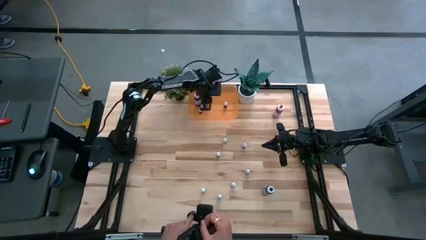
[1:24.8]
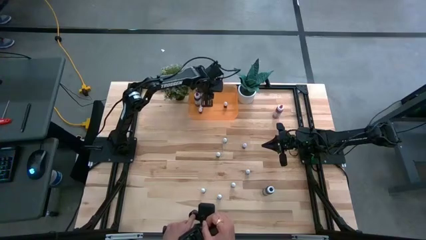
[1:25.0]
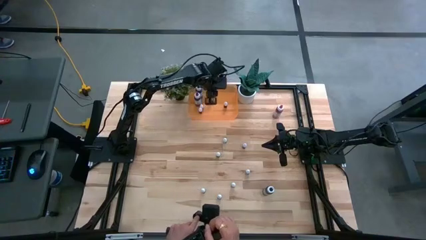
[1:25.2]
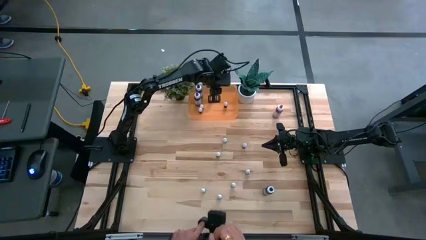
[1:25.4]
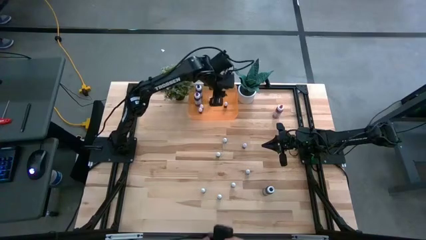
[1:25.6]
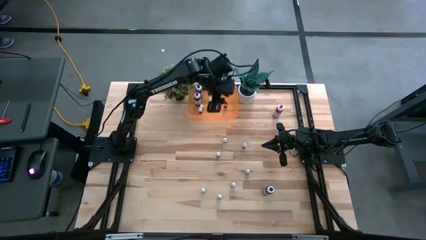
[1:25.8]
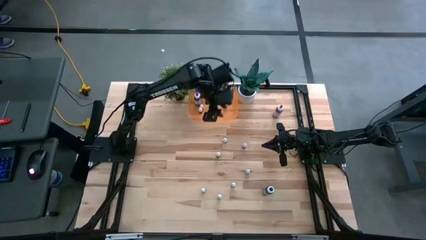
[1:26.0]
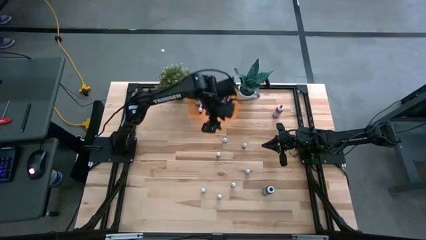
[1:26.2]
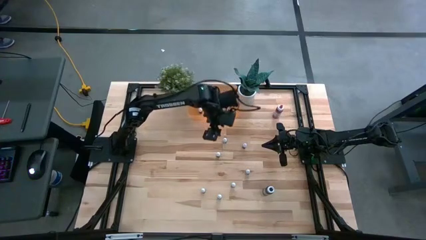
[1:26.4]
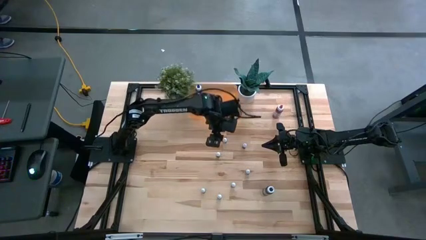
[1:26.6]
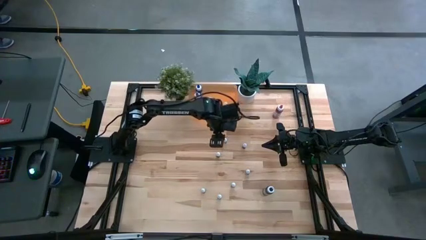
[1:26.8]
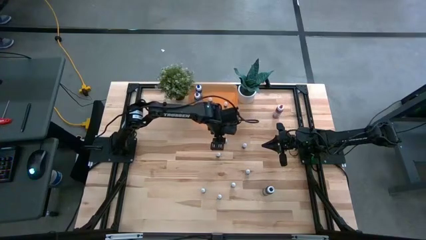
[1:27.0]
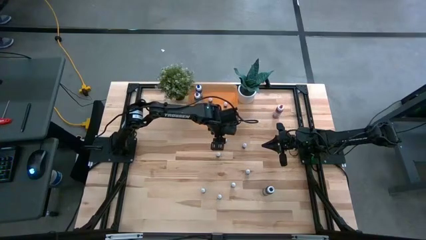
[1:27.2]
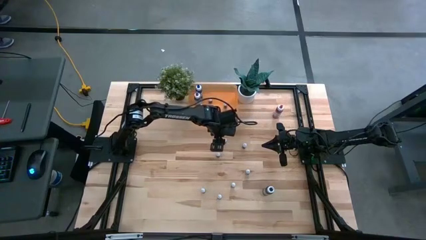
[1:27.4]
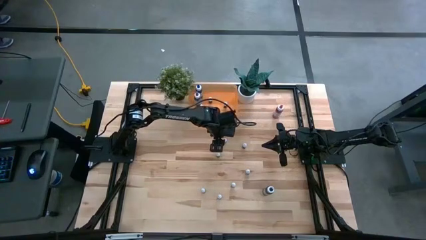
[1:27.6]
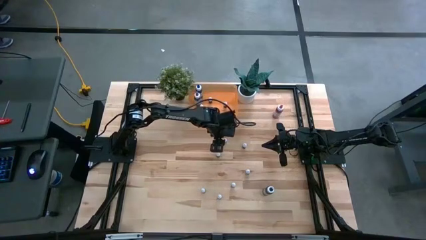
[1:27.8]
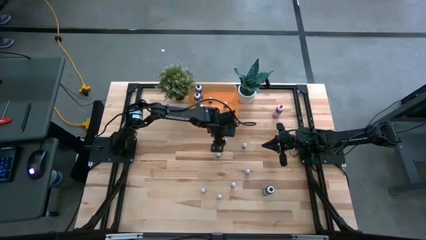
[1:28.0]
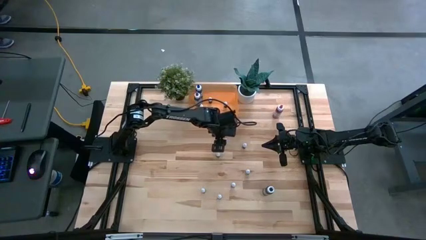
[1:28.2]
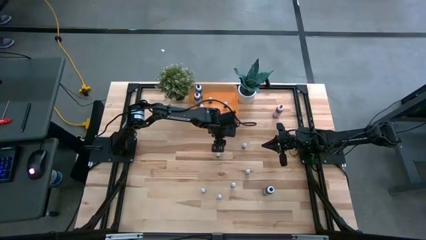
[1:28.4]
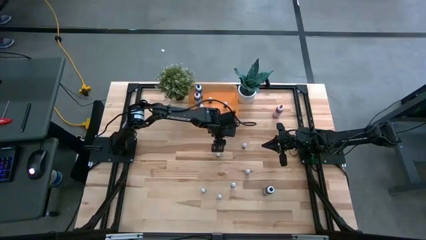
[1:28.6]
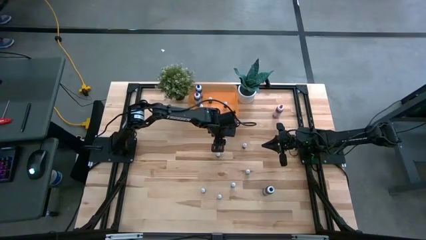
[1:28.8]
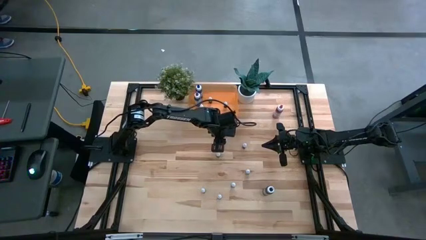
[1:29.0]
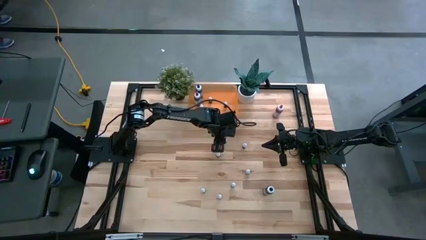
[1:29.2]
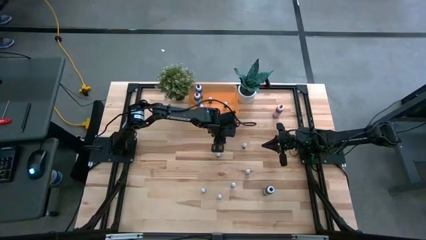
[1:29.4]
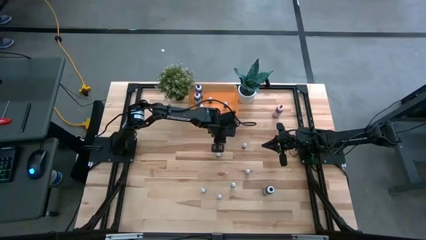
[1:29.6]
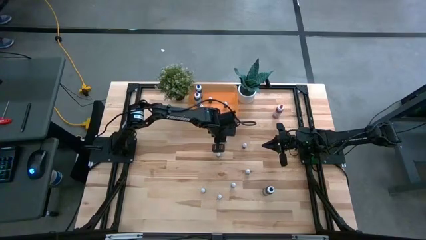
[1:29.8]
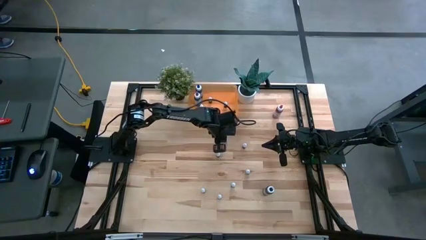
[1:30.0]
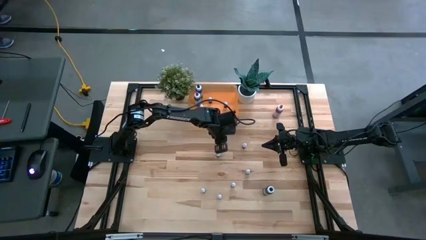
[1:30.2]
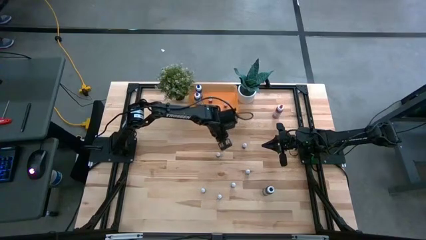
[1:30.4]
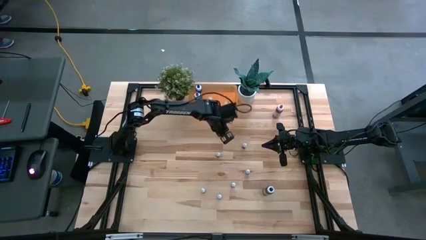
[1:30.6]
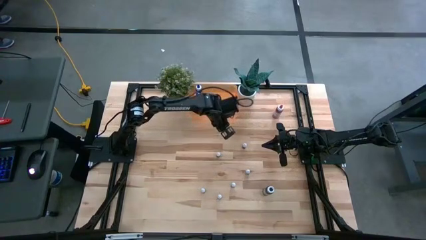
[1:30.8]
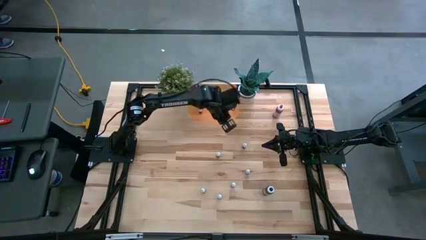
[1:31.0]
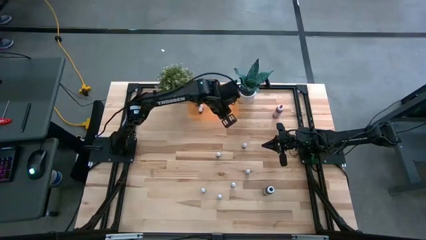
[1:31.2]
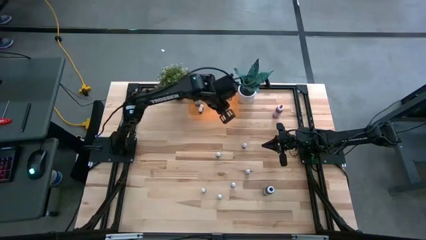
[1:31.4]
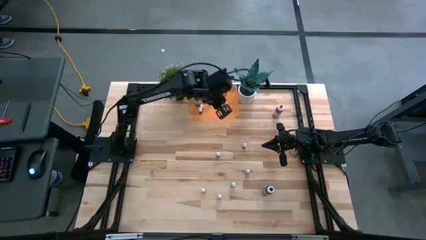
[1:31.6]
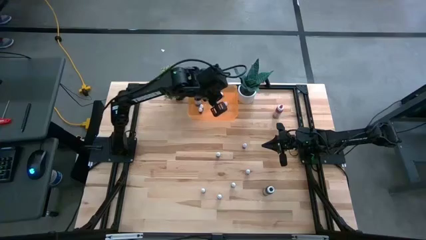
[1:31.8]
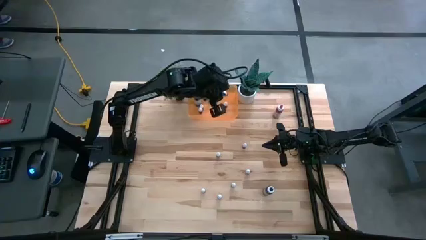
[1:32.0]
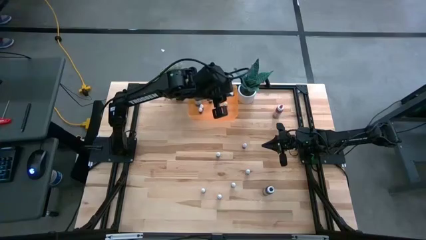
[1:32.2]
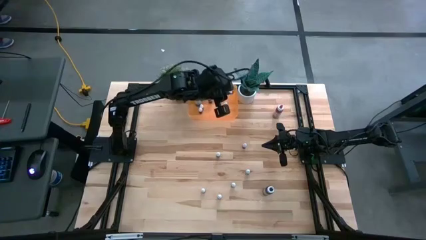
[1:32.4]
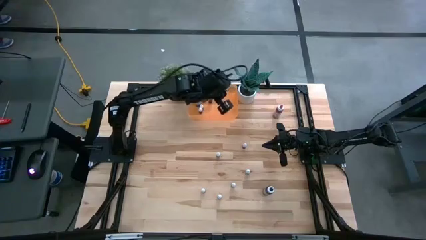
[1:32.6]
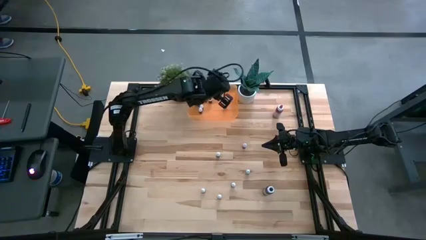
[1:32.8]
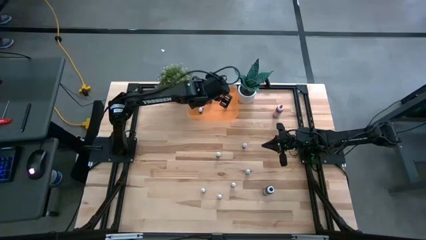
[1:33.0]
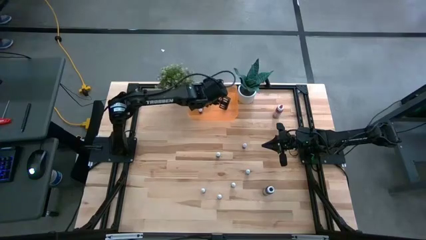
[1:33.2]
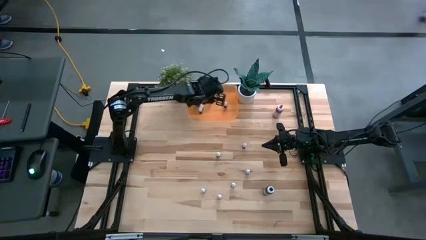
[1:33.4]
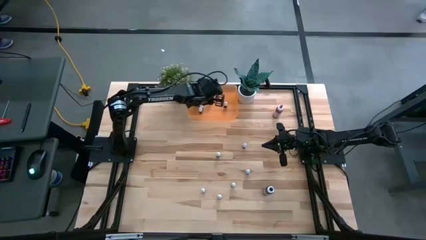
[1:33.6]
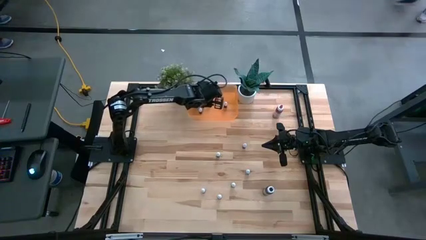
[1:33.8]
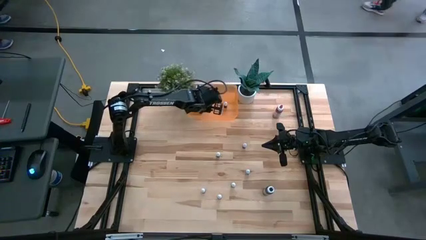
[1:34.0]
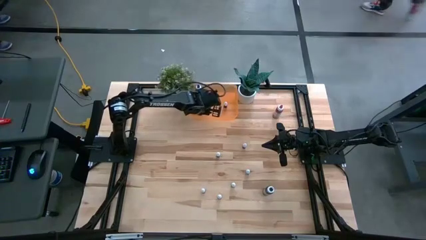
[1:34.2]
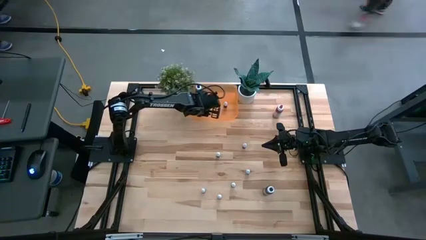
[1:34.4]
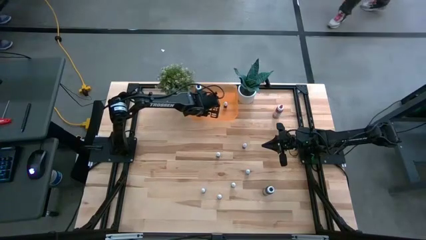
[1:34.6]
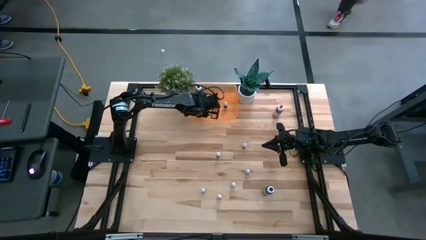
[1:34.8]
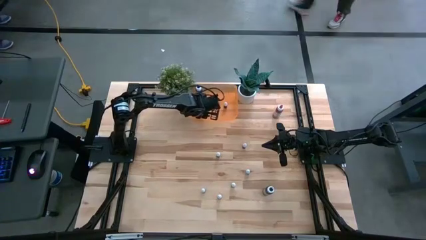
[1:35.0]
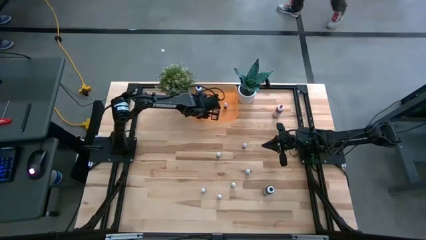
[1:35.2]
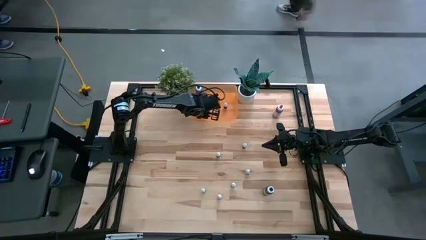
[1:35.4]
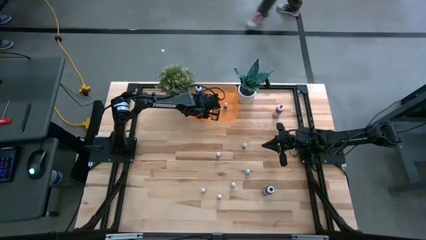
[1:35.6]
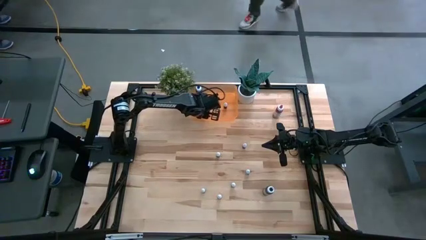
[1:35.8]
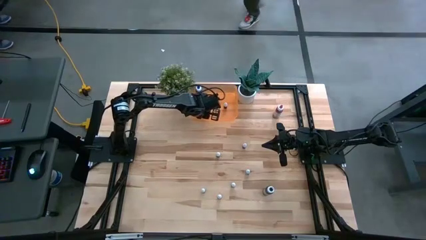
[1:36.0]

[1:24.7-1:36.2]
Task: Pick & Place food coloring
Put the left small black bottle into the bin

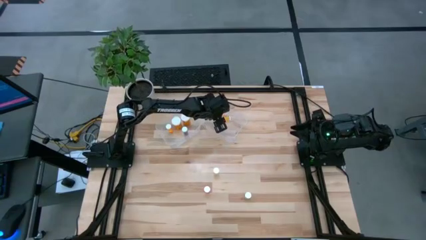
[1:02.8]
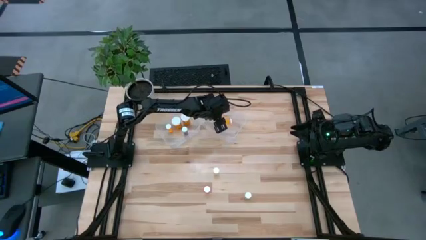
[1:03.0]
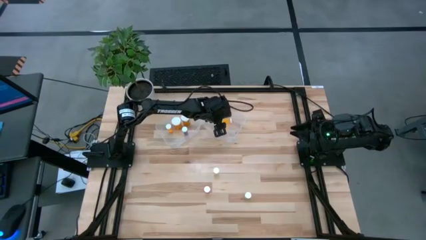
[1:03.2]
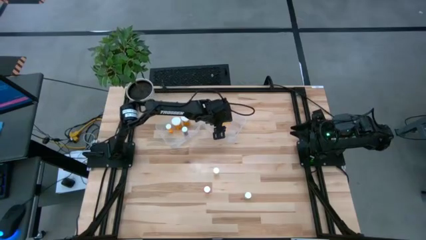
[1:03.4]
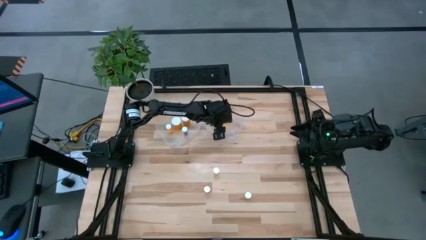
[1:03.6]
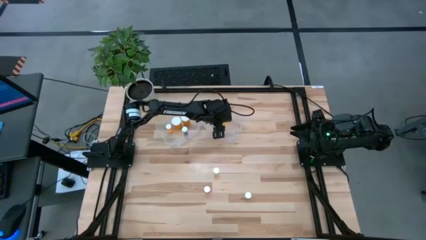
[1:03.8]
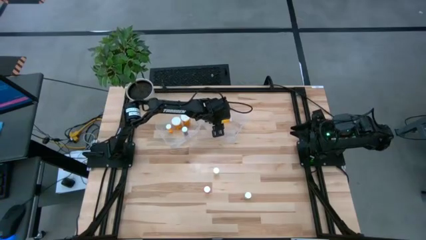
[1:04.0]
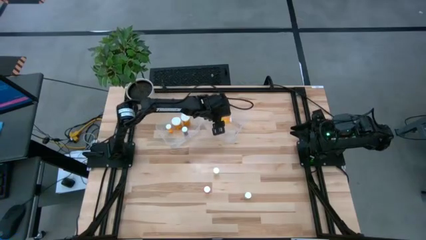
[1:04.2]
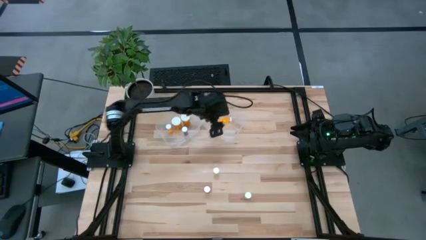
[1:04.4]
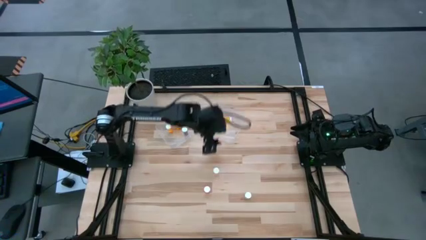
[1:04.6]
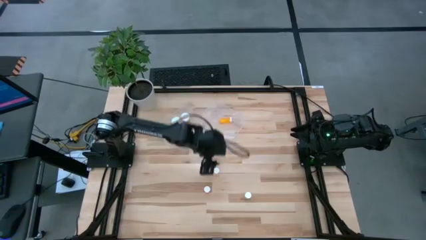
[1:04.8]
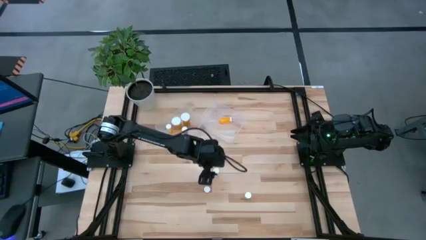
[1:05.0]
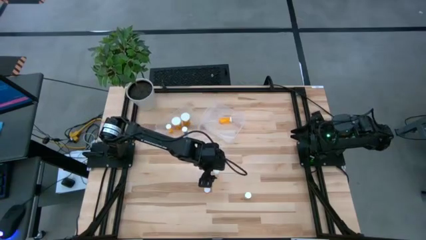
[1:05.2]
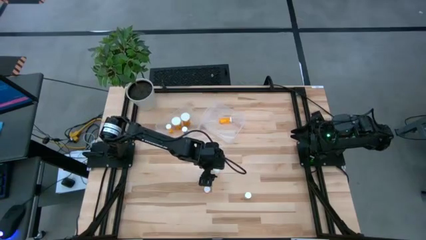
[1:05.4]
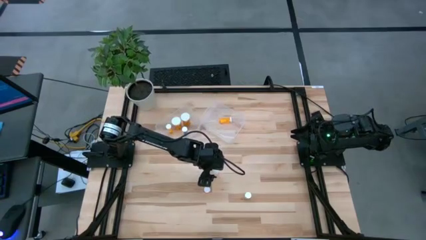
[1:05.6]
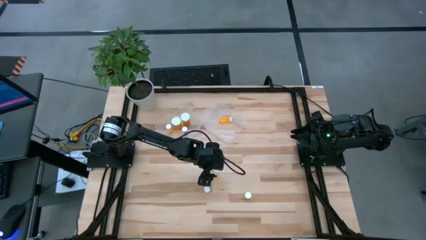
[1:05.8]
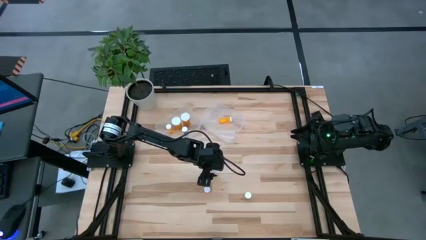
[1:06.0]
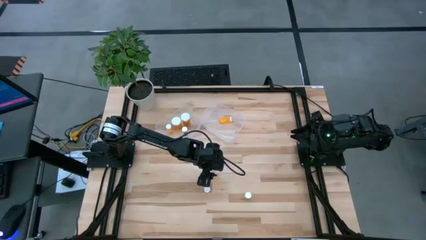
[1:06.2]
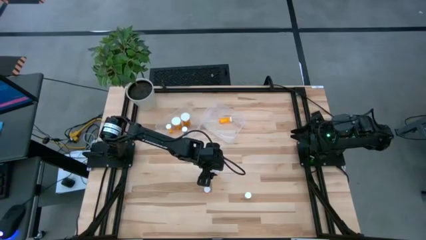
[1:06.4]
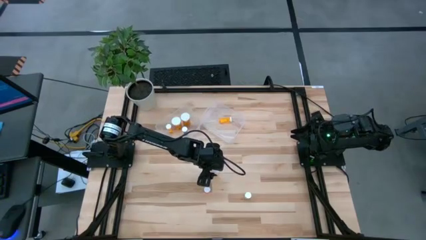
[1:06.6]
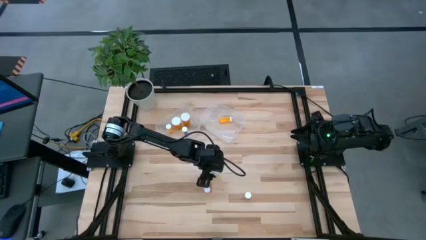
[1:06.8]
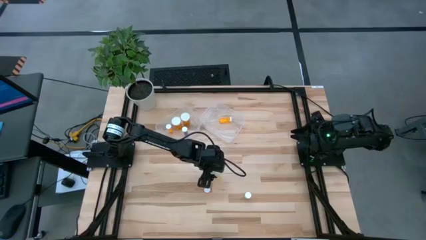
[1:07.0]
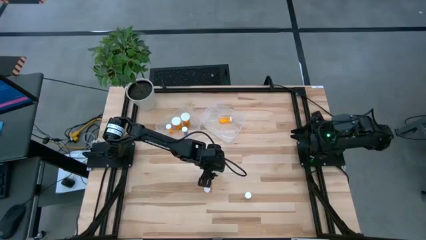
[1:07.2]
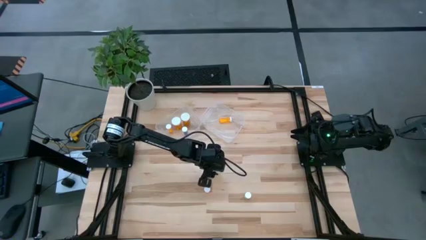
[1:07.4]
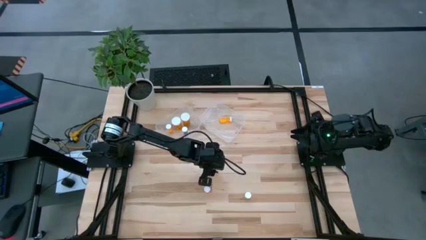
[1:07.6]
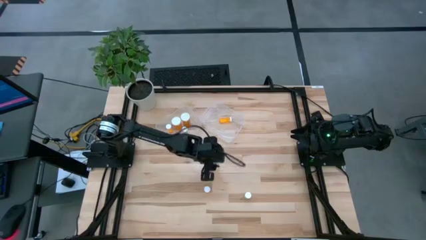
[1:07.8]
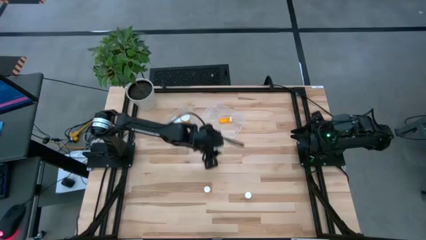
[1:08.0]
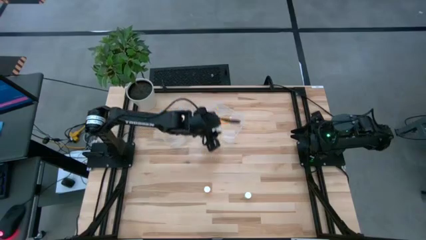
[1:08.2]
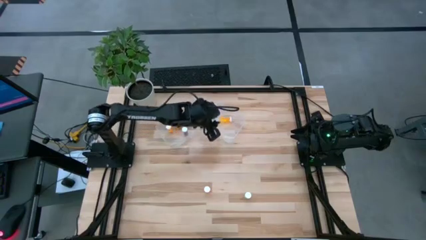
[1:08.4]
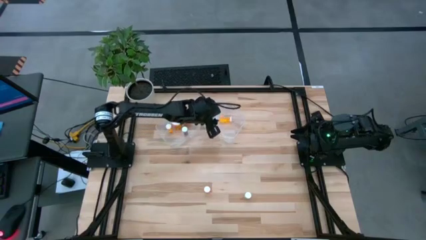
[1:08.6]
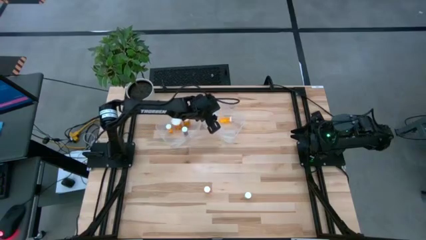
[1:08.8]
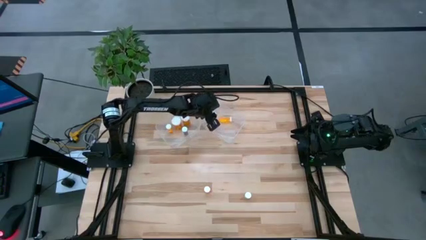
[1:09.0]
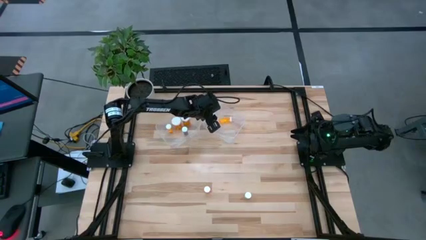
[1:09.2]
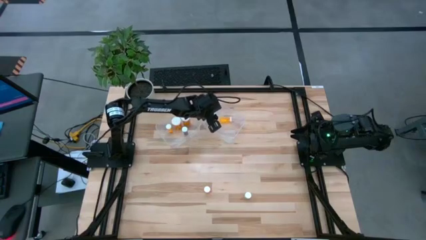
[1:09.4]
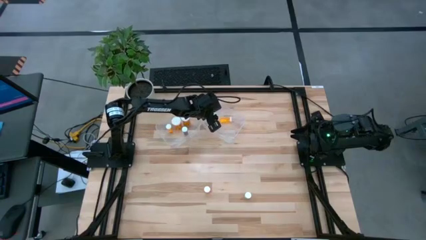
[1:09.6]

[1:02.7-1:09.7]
Task: Pick and place medicine bottles into bin by pill shape (circle, oval)
Put the small yellow tablet bottle into the right transparent bin
